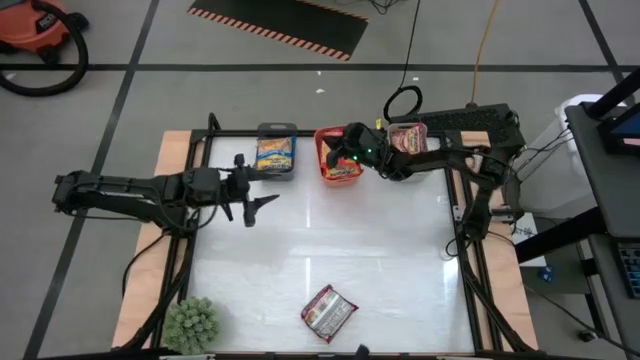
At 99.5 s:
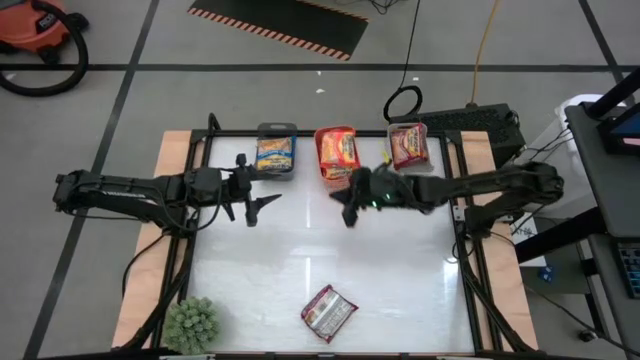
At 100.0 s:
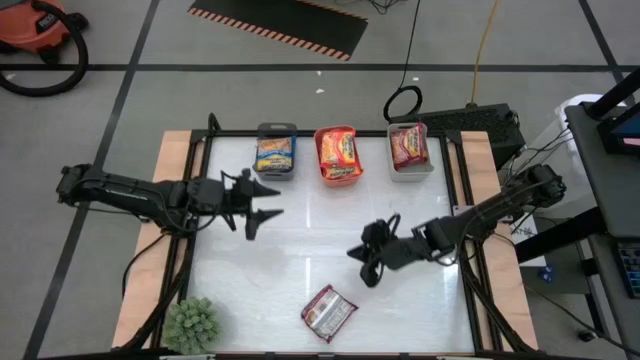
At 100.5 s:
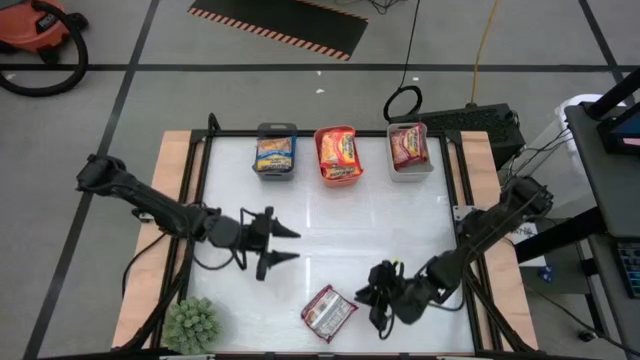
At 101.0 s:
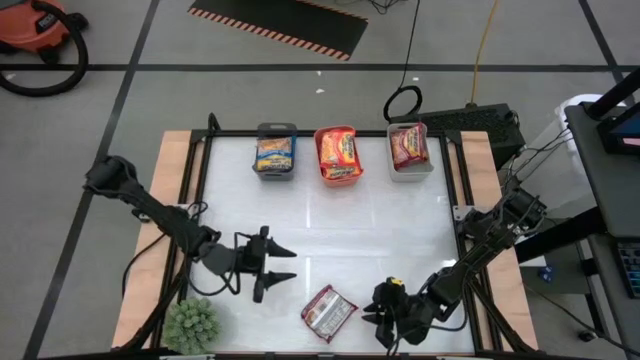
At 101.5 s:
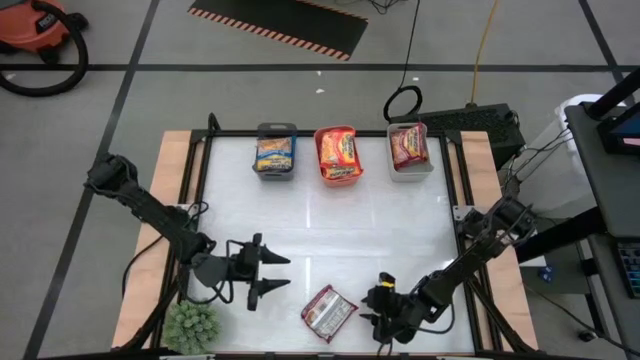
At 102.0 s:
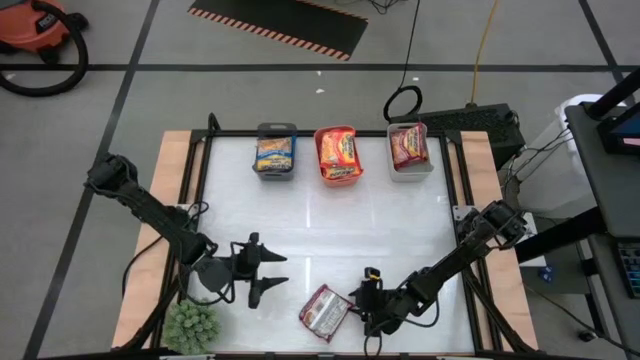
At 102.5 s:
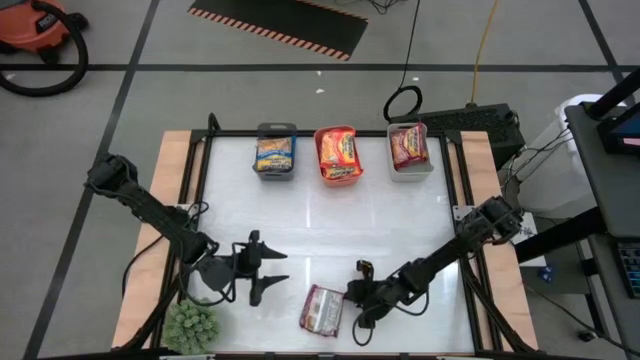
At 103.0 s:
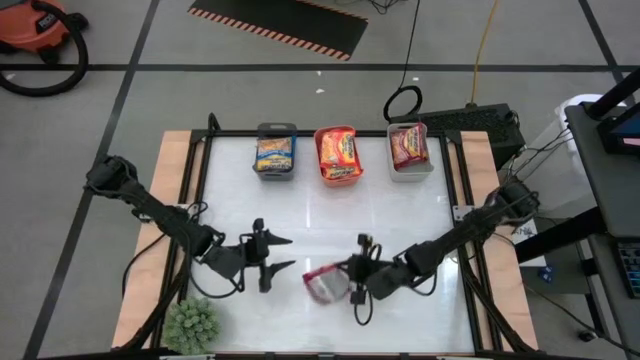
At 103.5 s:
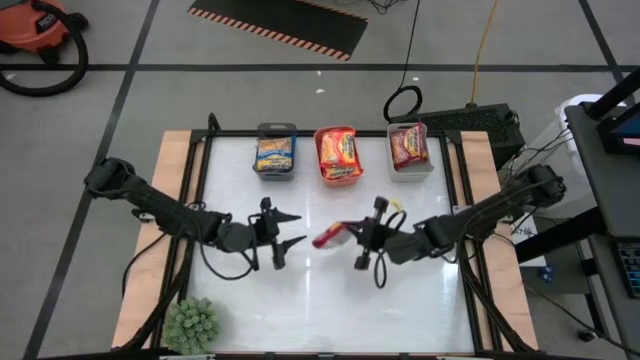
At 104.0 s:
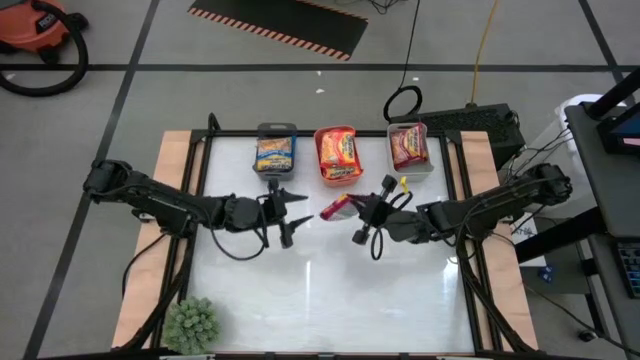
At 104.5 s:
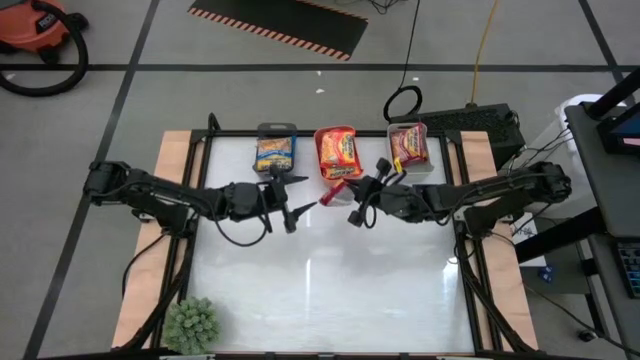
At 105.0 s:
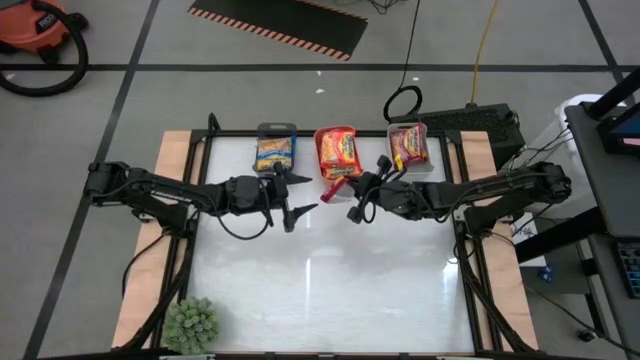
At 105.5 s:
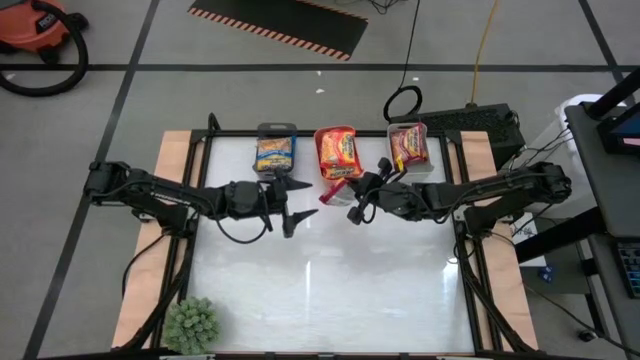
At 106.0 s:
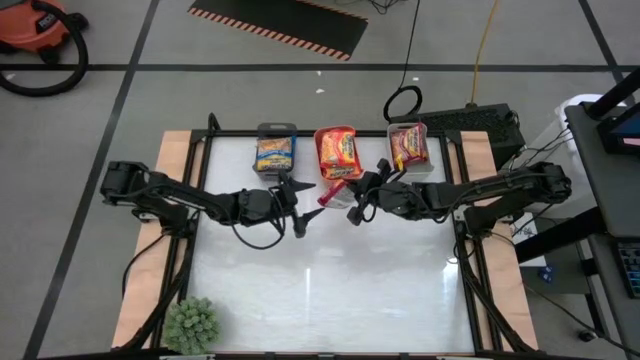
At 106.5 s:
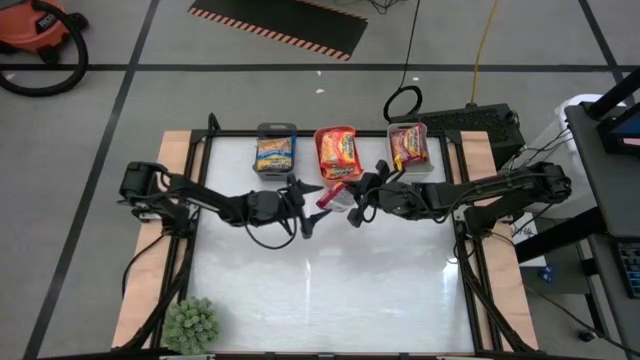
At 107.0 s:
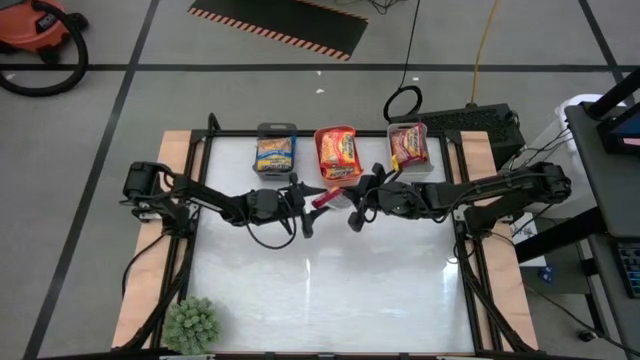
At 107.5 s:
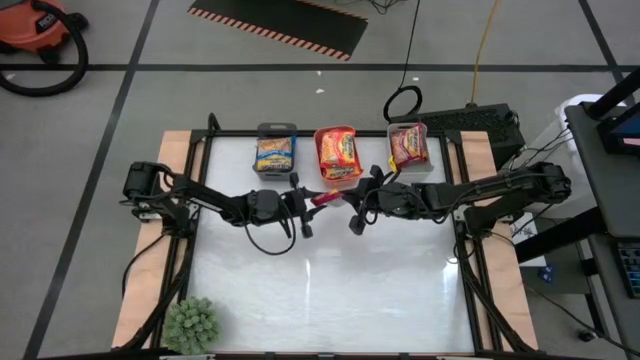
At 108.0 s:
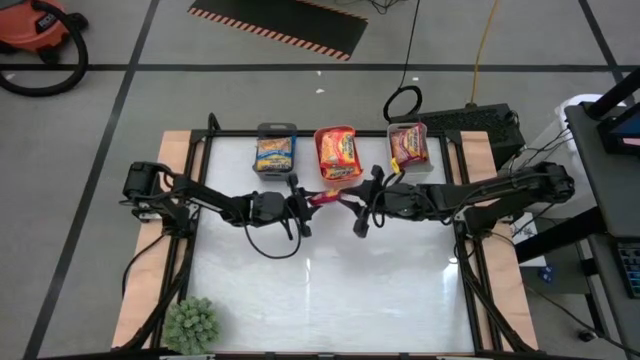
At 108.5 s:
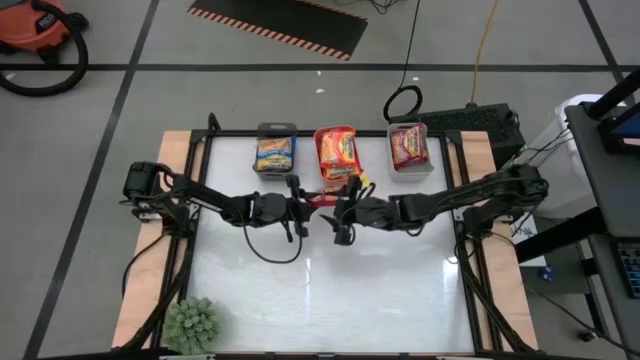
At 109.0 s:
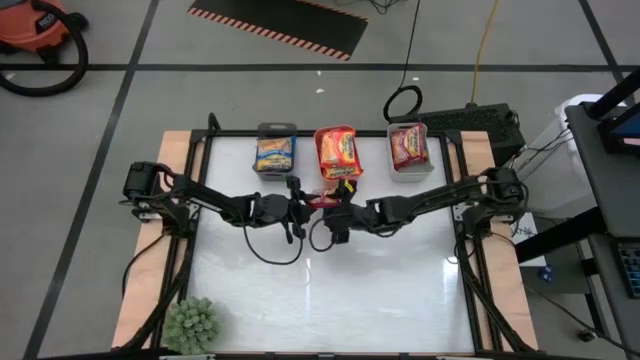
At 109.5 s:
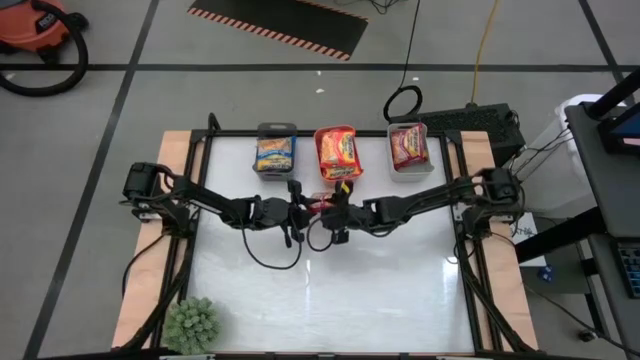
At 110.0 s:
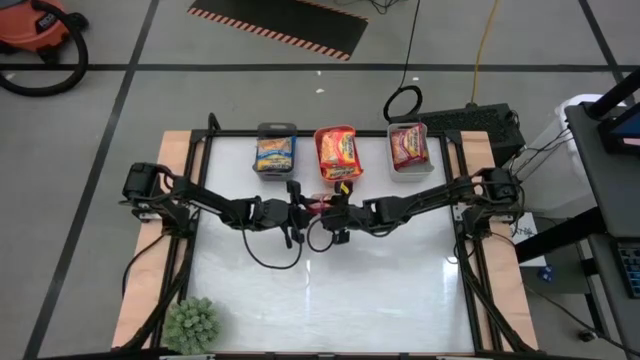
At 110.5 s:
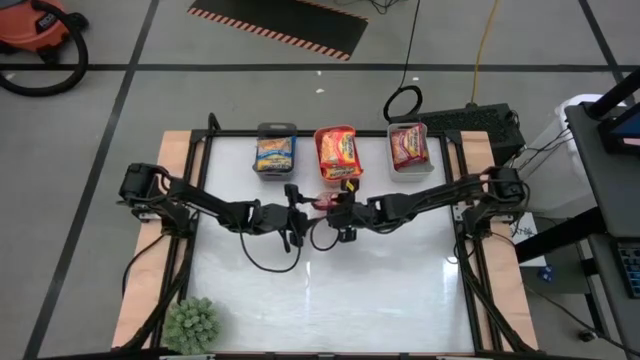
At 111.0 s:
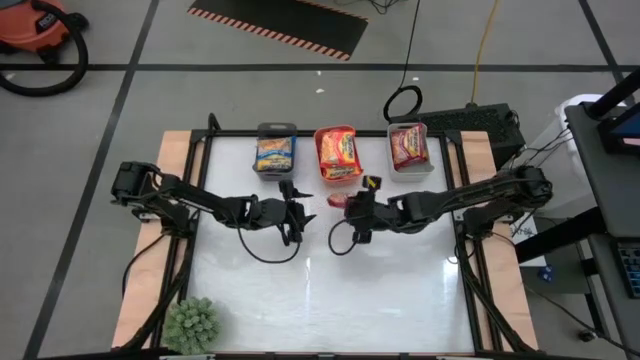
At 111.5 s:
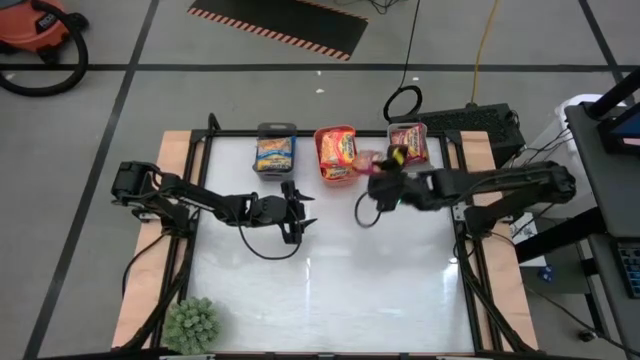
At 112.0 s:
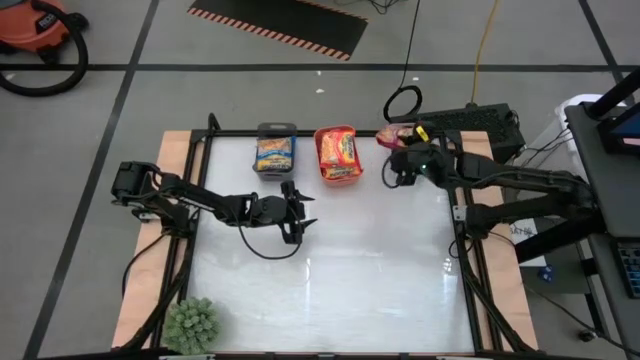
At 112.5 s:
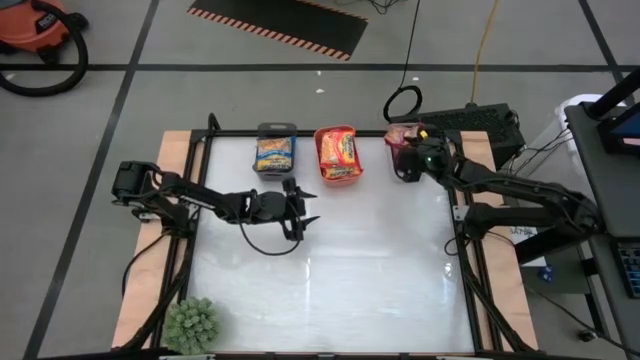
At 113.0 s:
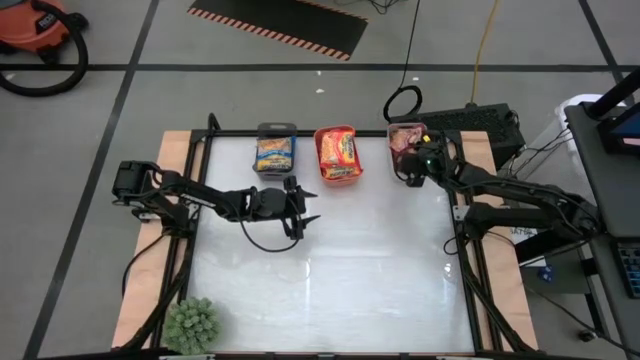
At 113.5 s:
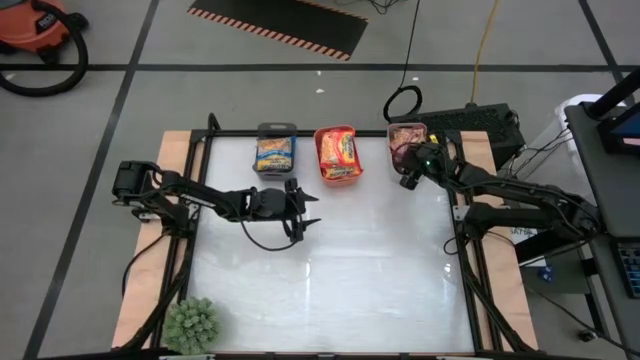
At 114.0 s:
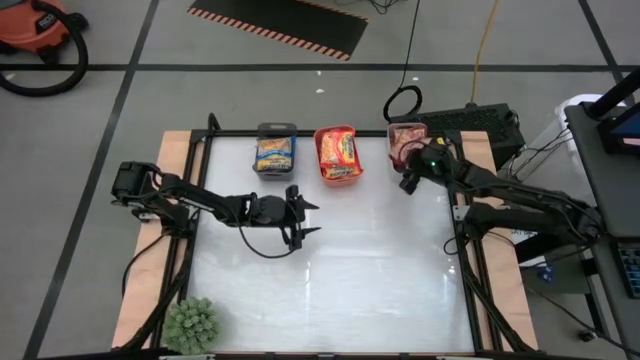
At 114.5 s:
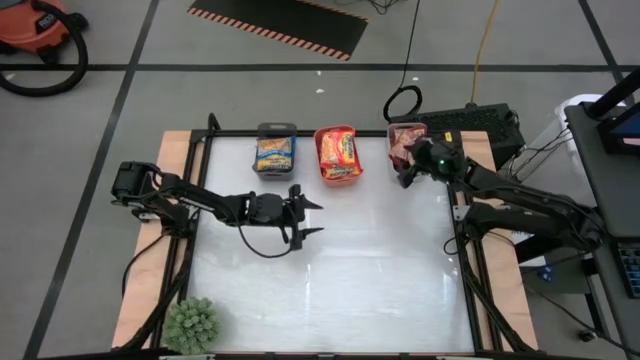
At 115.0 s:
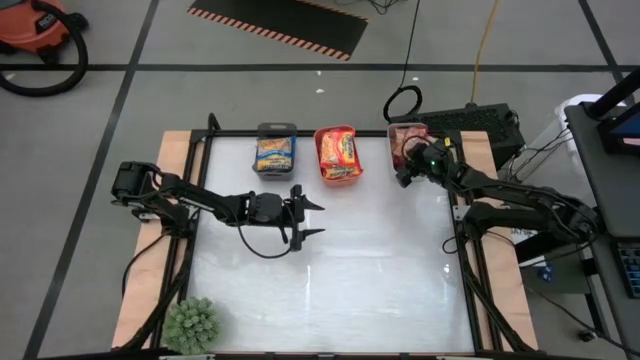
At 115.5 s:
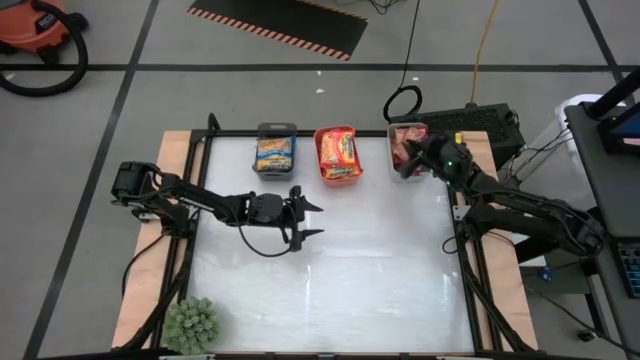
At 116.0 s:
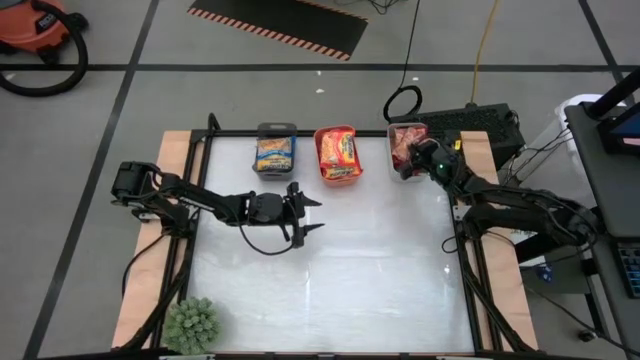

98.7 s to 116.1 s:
Task: Sort Maruchan noodles
Put the red noodle pack into the gray bin

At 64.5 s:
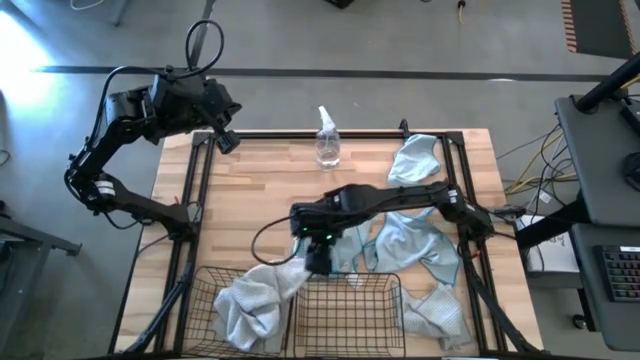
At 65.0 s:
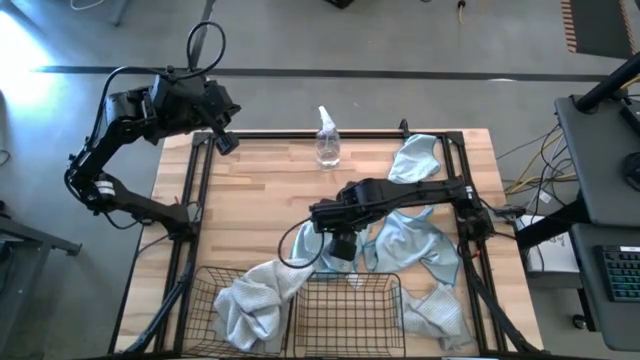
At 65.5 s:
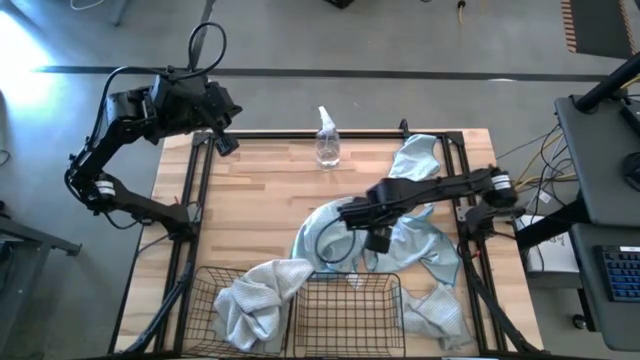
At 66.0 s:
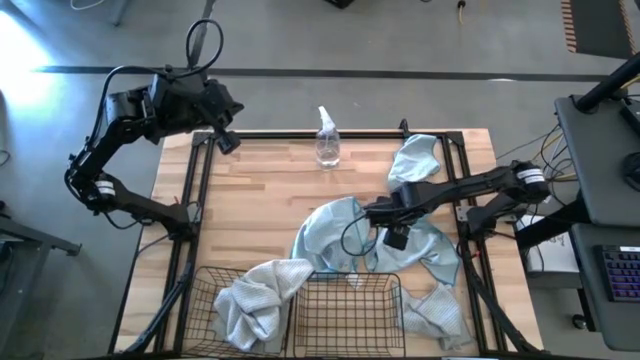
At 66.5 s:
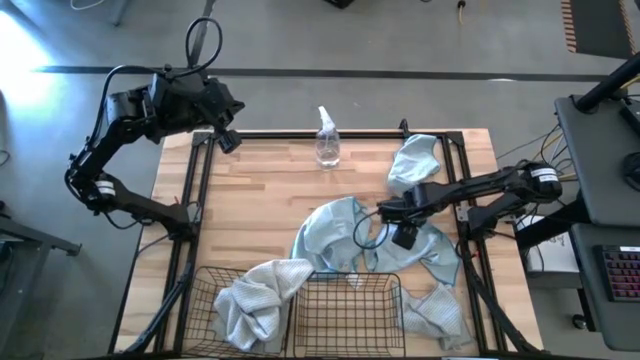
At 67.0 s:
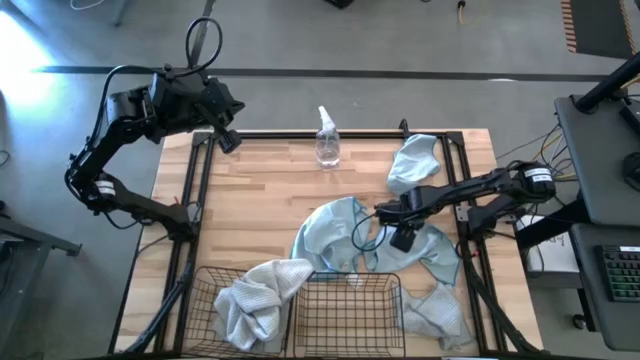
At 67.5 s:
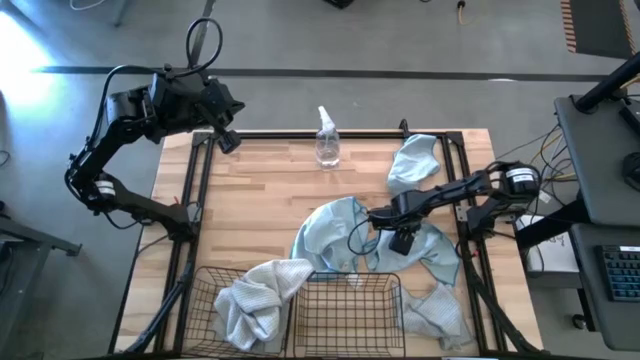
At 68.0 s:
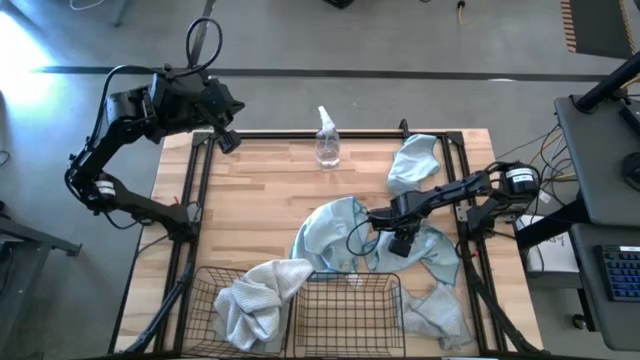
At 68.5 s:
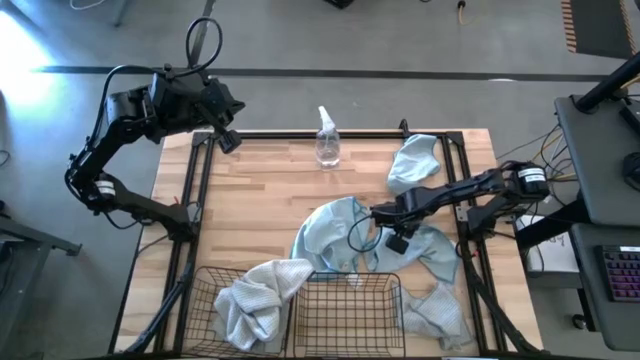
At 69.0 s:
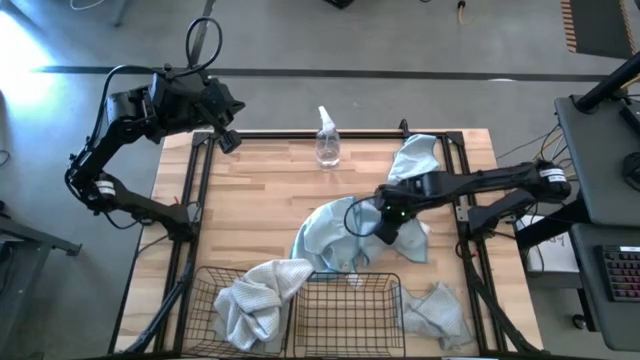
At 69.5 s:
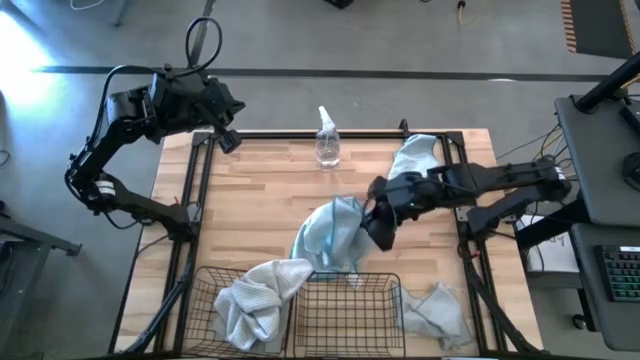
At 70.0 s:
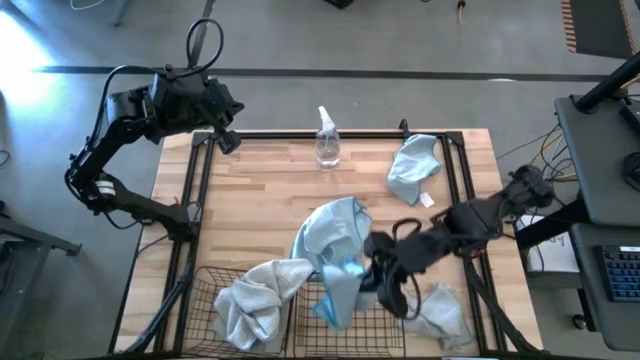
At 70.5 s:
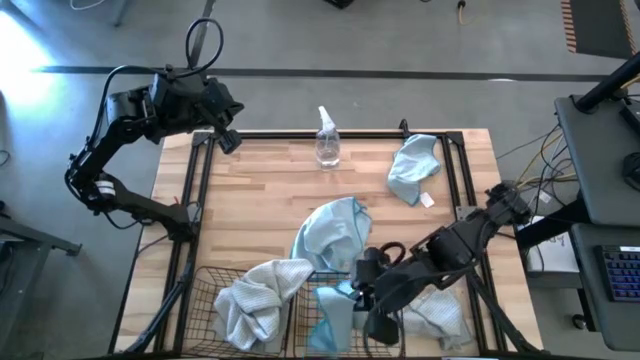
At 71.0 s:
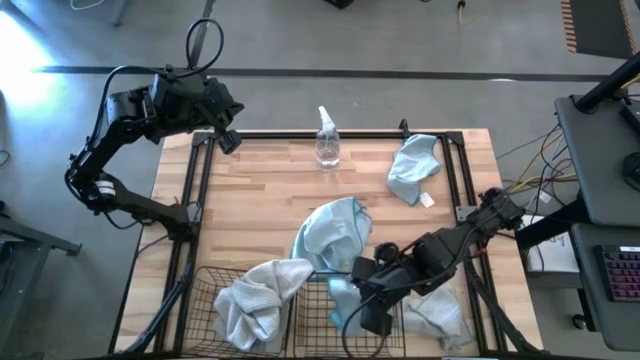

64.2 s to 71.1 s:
Task: Sort microfiber towel by color & place in baskets
Put the bottom right blue microfiber towel into the right black wire basket
